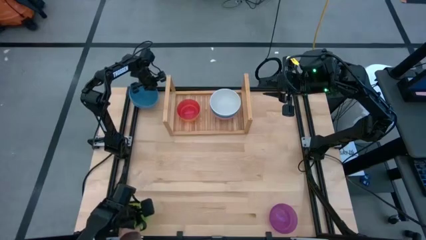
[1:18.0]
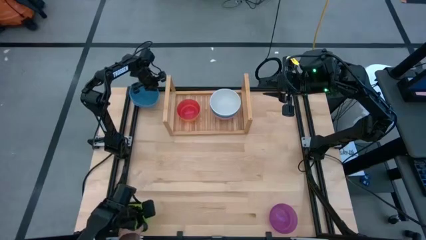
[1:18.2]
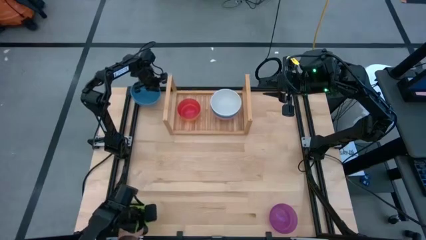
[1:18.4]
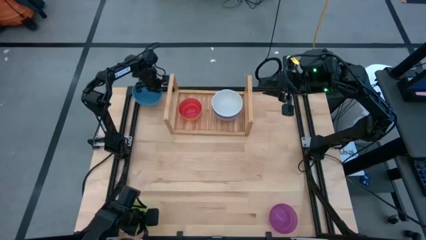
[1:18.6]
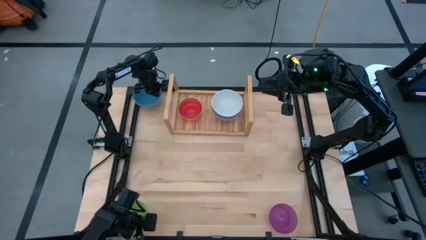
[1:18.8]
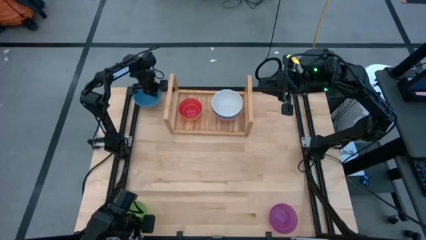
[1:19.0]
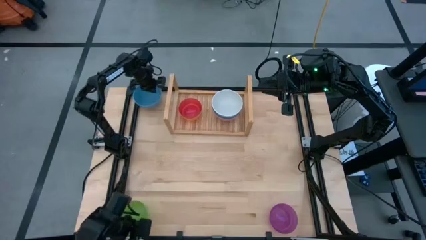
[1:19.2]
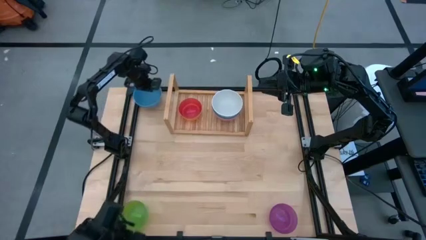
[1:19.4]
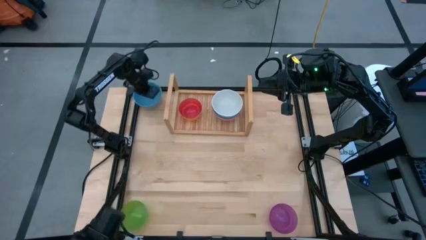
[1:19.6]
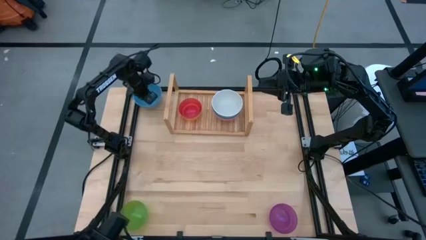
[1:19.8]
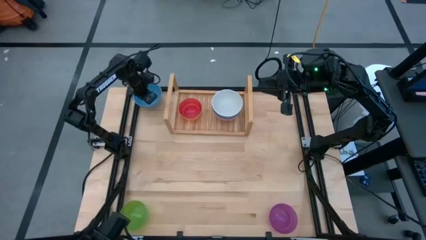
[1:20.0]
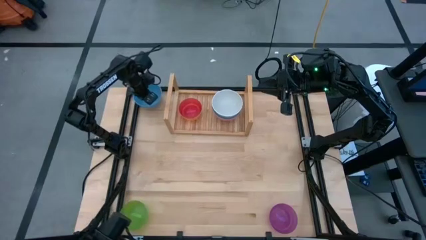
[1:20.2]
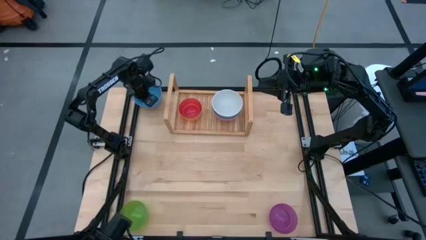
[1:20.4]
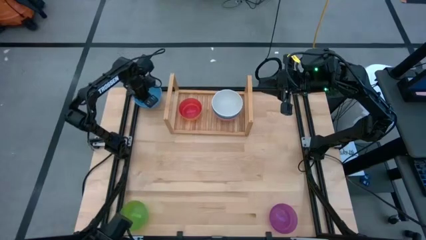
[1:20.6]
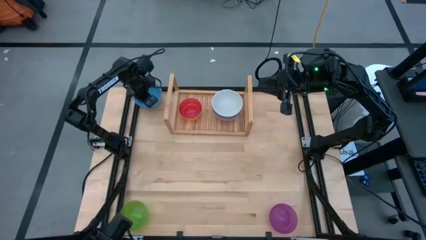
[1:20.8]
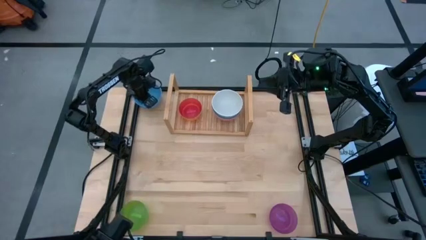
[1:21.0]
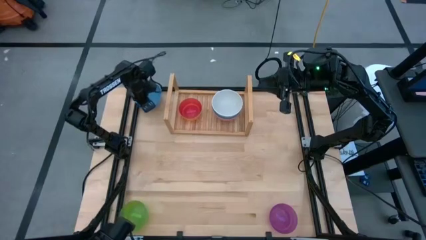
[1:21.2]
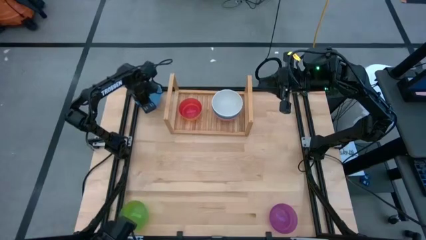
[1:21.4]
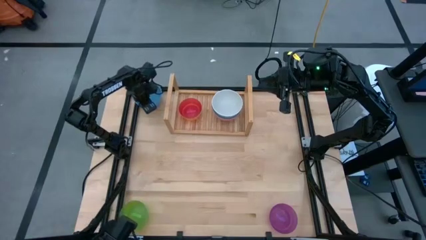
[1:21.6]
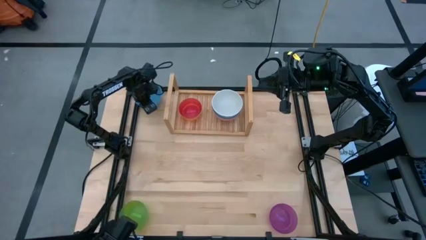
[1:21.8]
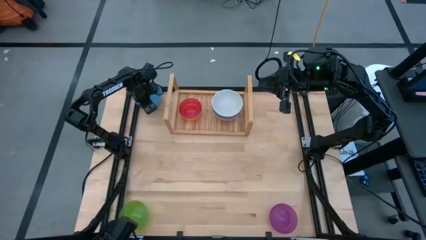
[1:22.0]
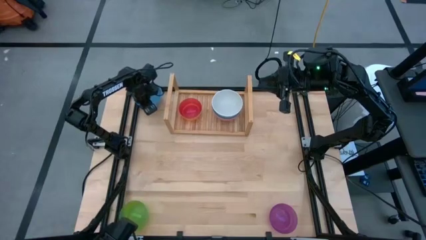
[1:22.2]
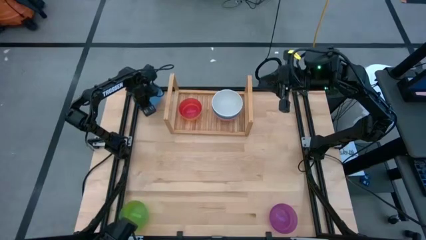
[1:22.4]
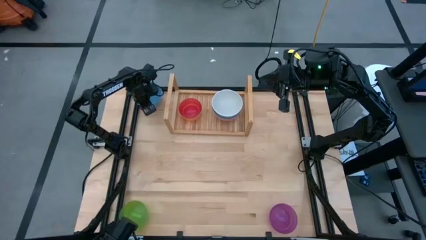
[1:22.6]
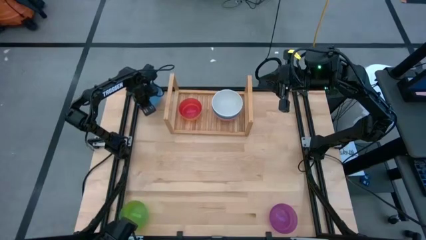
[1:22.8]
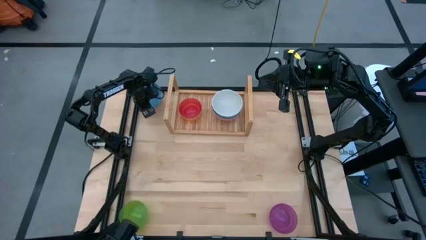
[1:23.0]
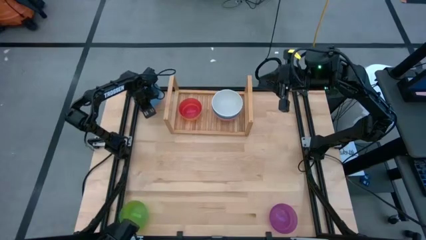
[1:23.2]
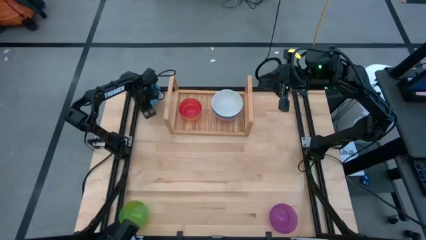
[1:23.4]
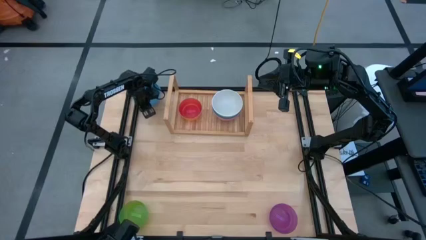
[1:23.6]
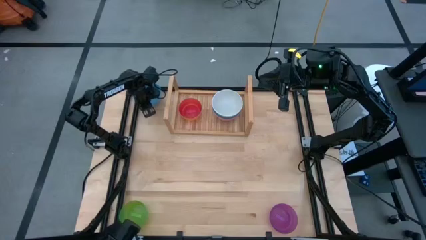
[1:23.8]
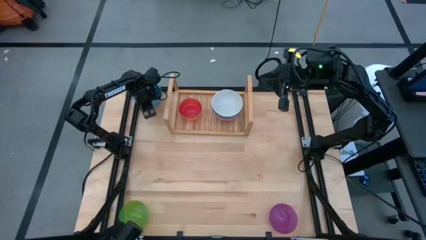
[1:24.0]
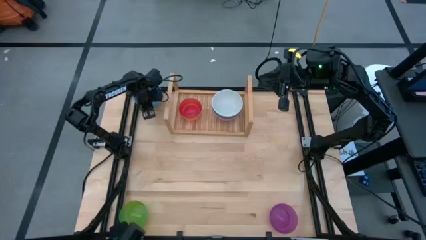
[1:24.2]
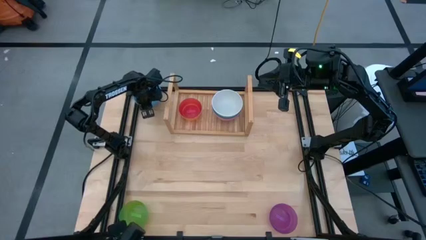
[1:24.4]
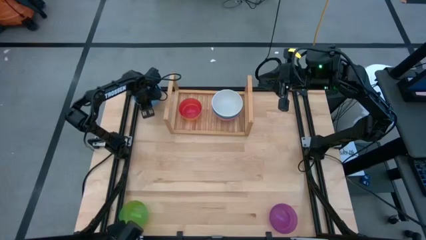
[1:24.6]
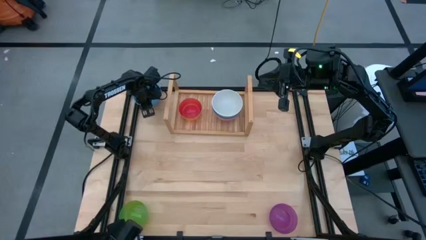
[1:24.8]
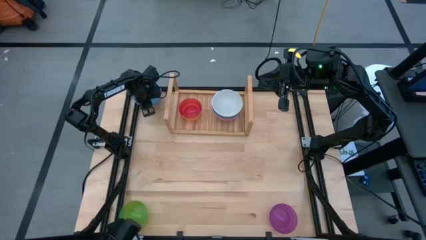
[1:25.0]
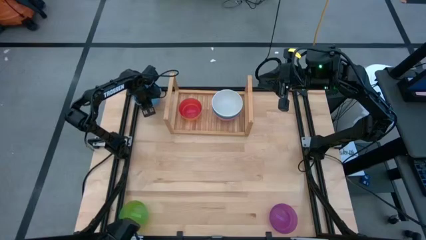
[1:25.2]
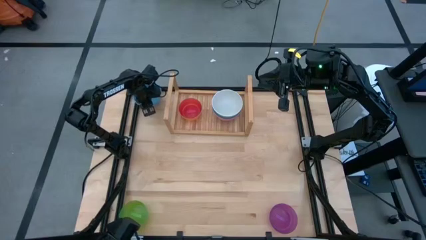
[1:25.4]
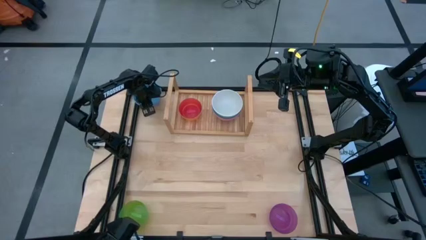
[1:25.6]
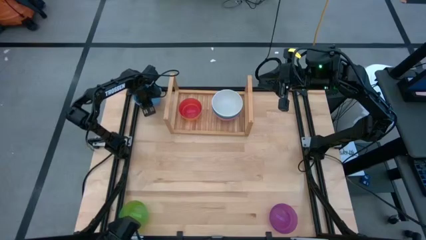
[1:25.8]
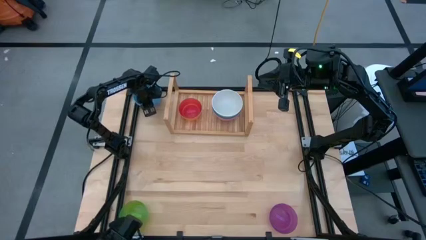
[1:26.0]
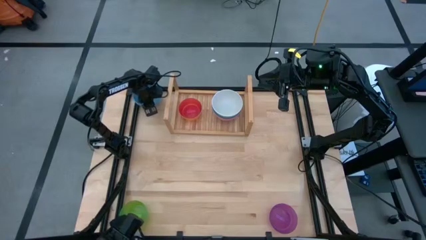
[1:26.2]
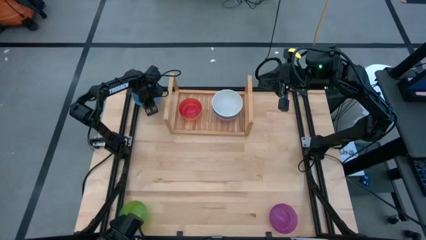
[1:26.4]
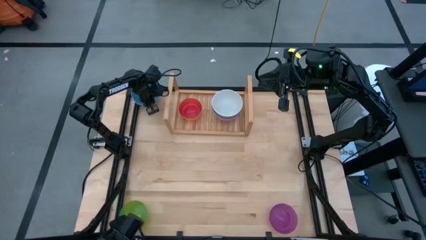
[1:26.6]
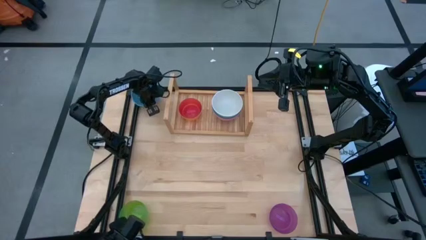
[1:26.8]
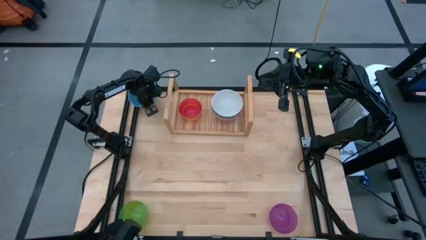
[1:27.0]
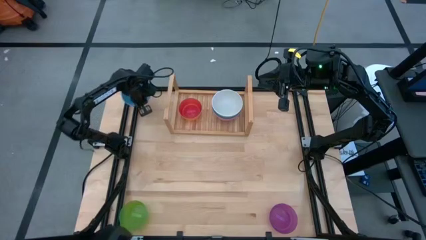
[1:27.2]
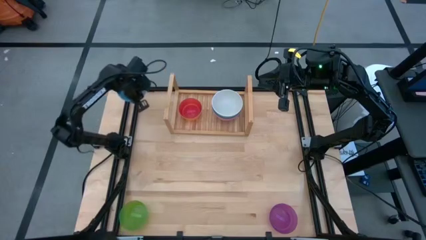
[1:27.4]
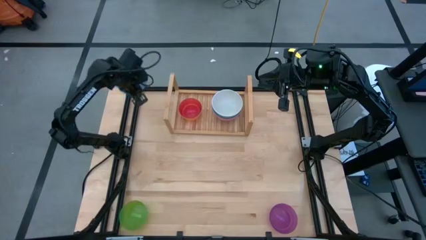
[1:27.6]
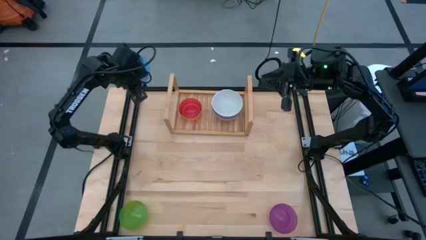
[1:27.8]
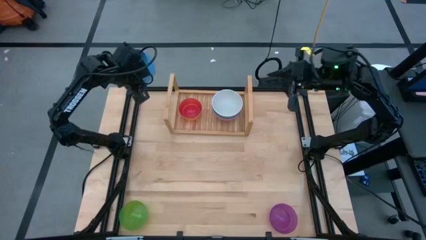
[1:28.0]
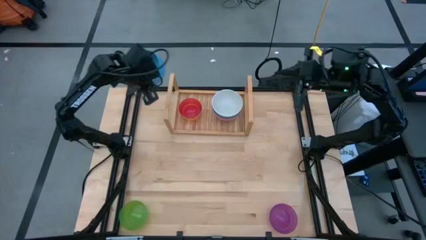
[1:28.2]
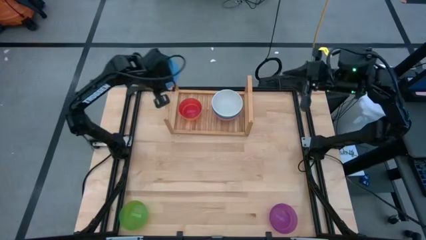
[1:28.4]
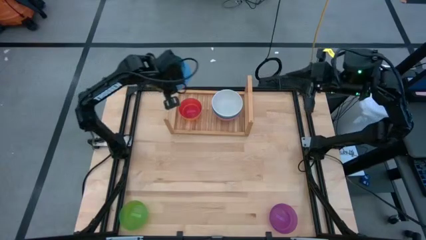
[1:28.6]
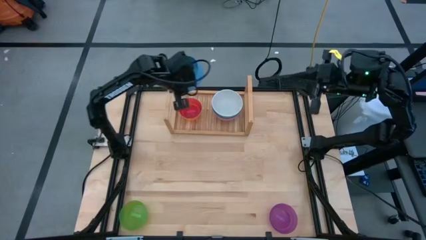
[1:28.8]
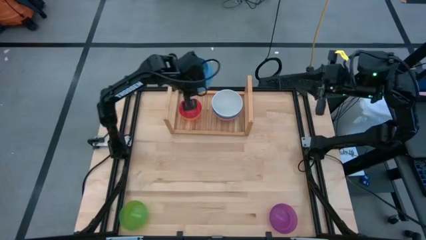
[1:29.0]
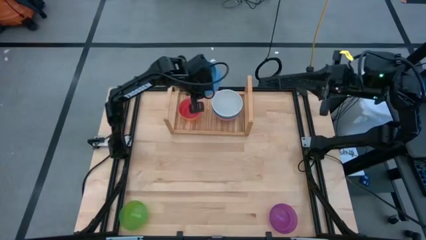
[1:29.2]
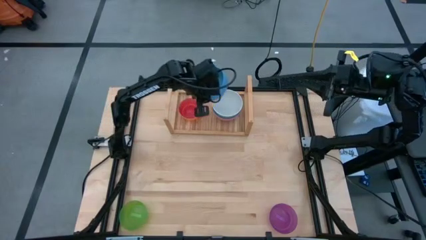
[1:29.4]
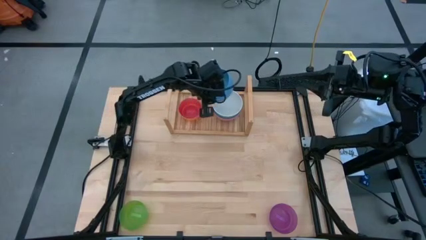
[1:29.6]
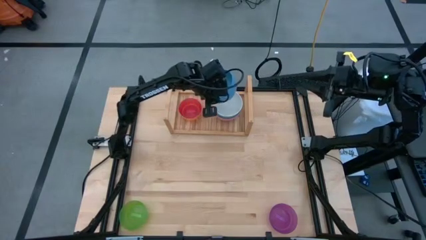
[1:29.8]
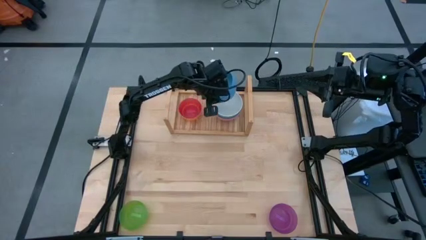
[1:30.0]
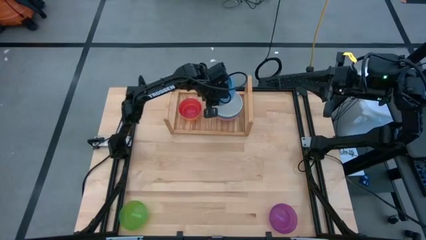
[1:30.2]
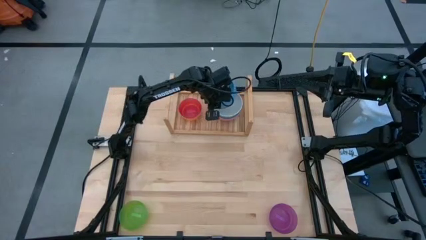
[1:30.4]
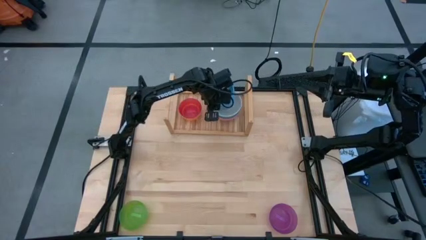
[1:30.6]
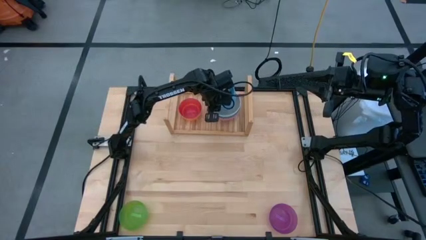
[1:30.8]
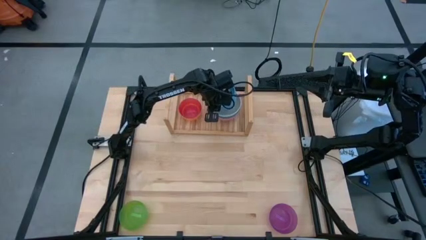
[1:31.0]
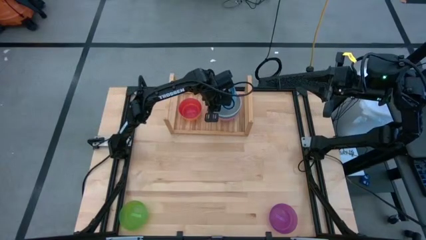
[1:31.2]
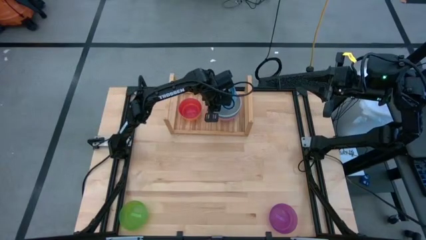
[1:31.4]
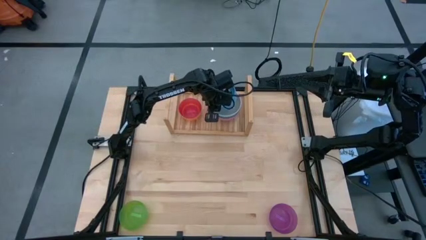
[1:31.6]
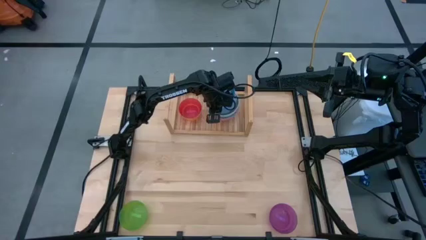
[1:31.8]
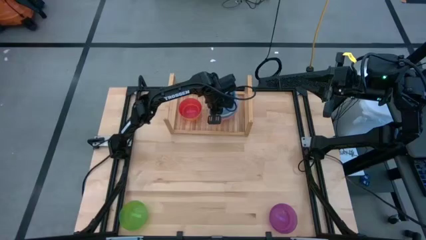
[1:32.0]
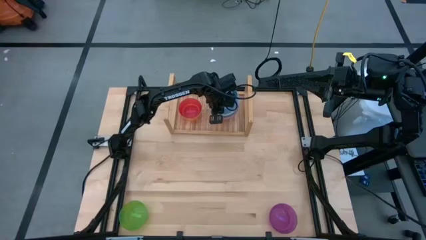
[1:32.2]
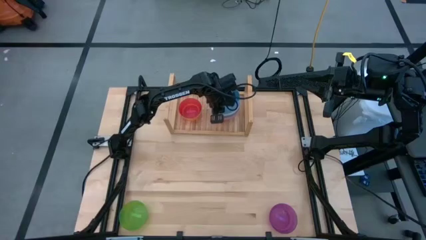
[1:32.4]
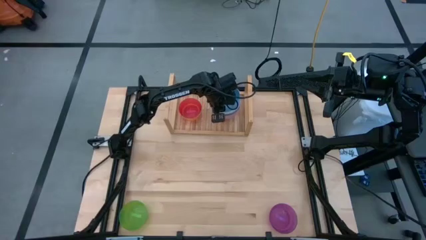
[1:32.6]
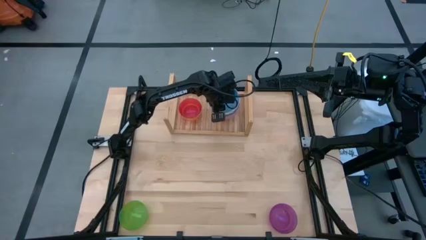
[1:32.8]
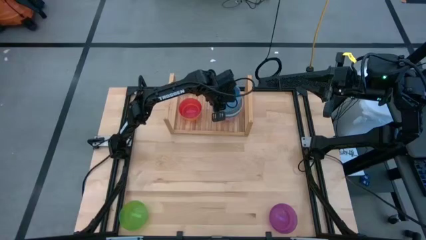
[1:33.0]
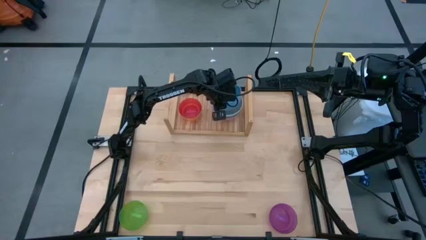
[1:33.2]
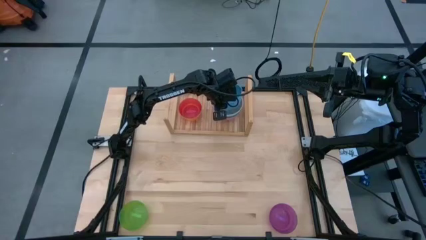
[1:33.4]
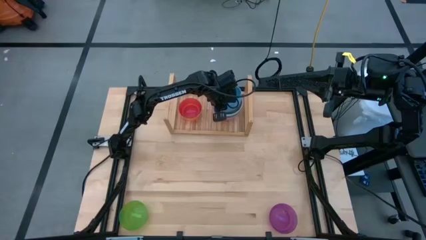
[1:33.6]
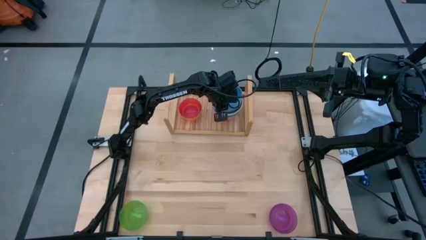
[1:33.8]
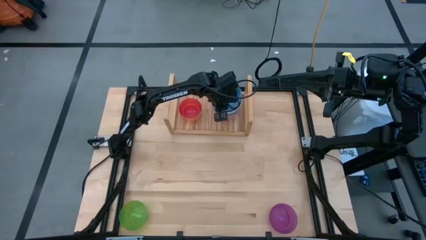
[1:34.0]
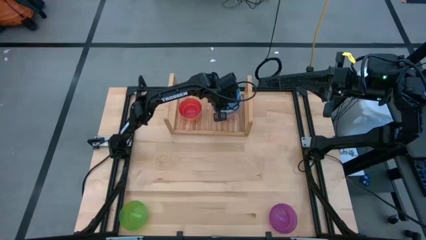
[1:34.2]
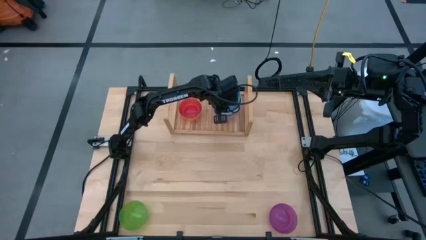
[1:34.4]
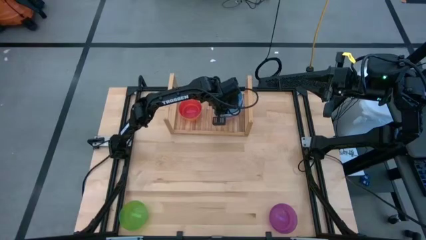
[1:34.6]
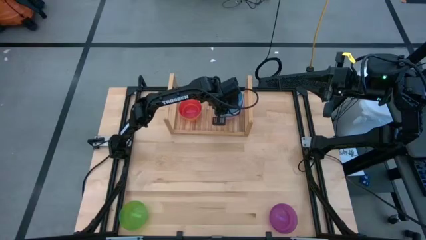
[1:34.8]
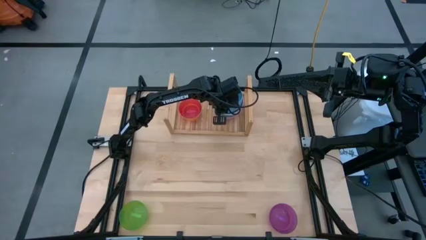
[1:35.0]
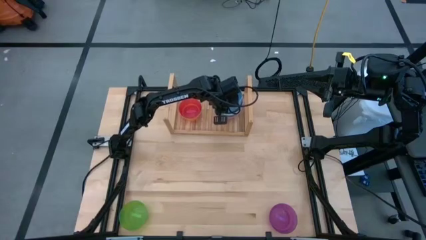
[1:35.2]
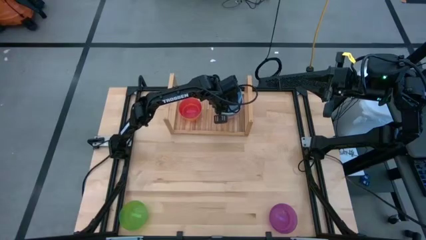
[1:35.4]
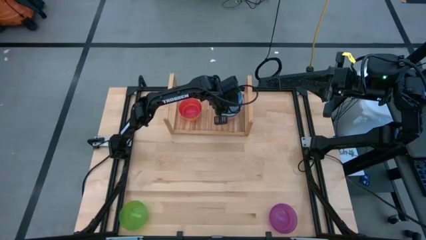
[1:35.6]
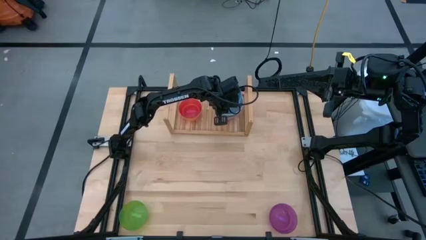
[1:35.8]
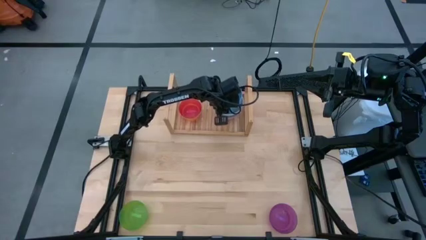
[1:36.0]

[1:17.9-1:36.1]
Task: Place and stack bowls onto a shelf
Stack the blue bowl onto the white bowl
